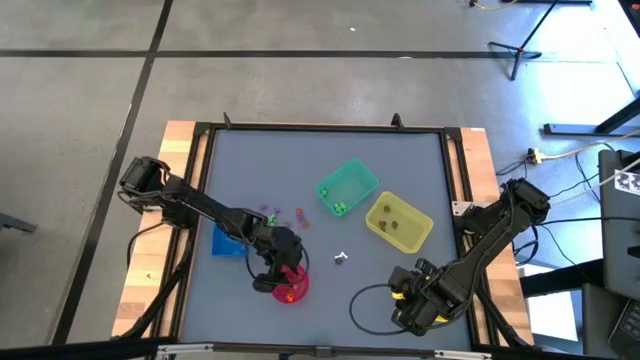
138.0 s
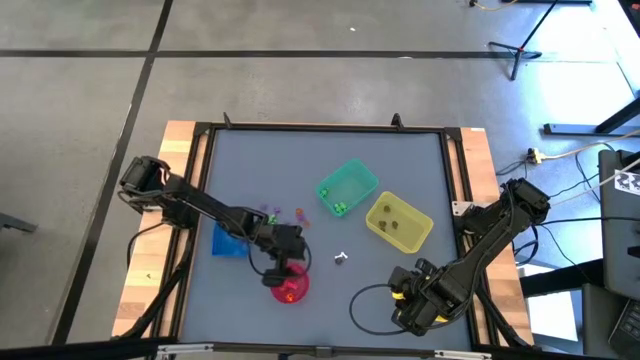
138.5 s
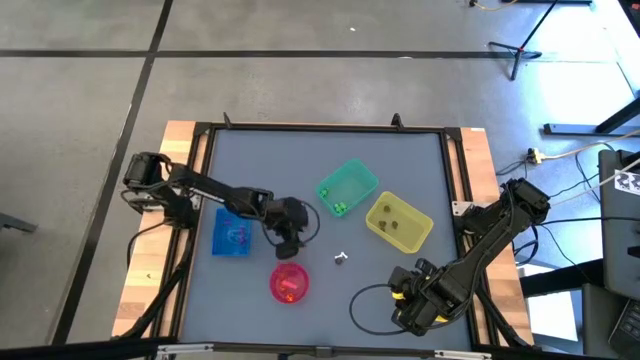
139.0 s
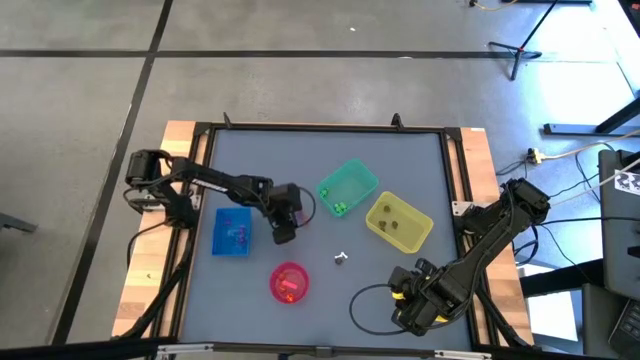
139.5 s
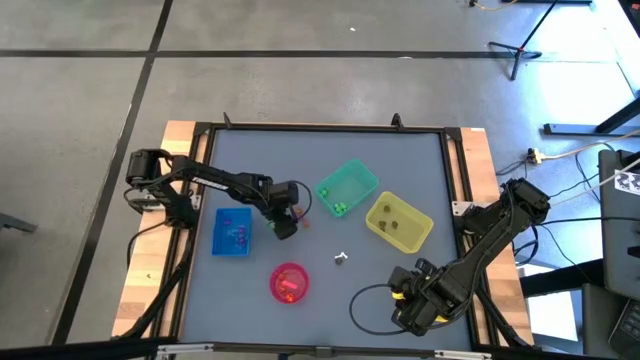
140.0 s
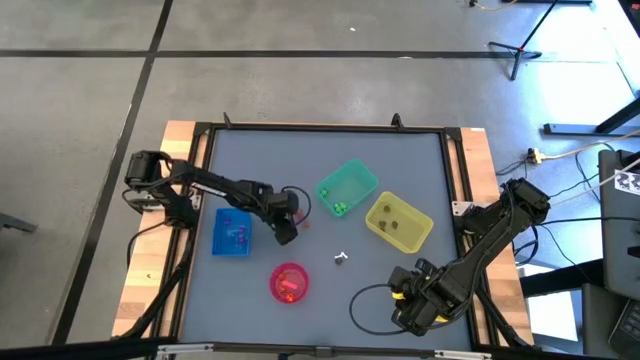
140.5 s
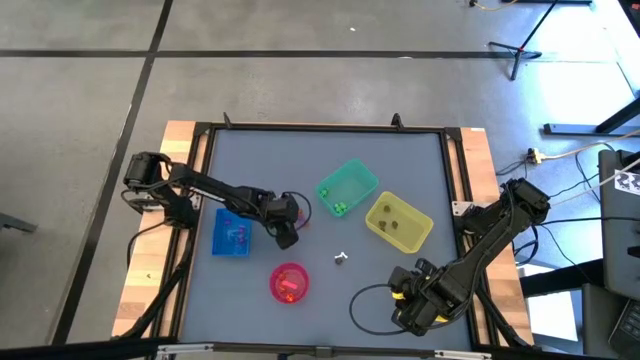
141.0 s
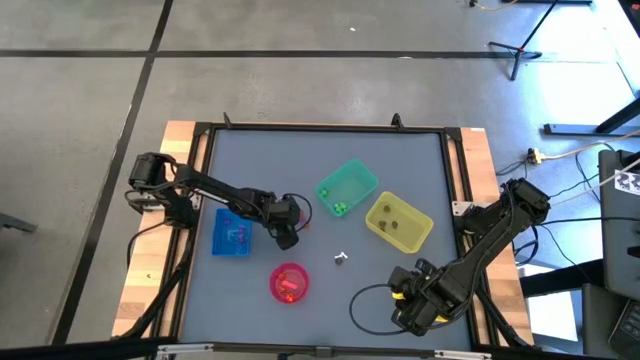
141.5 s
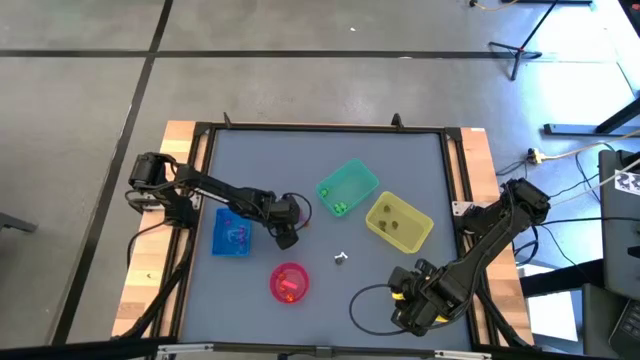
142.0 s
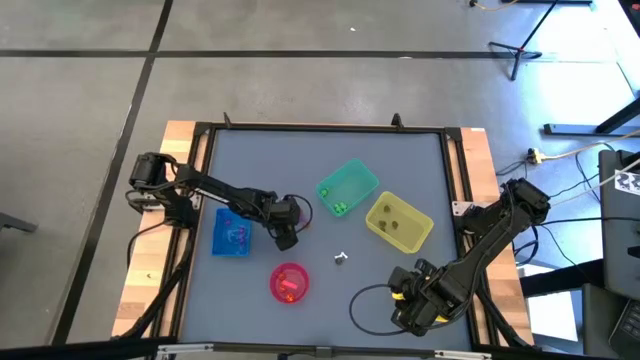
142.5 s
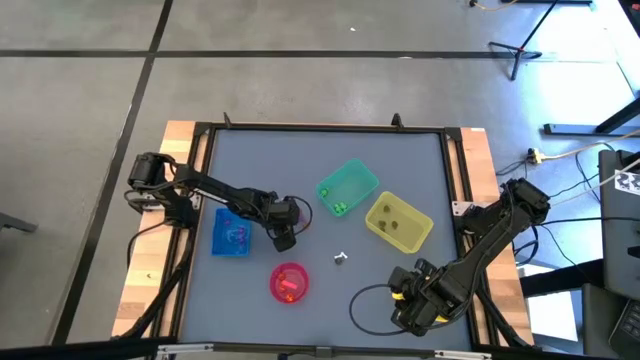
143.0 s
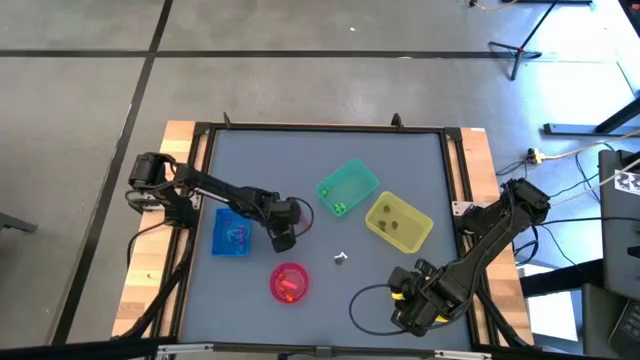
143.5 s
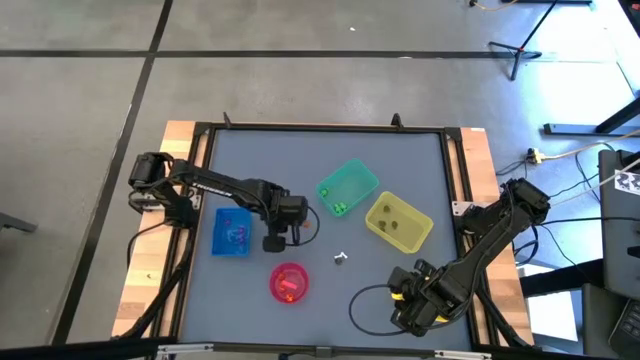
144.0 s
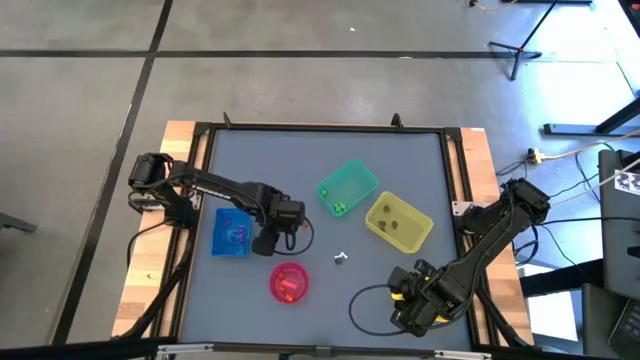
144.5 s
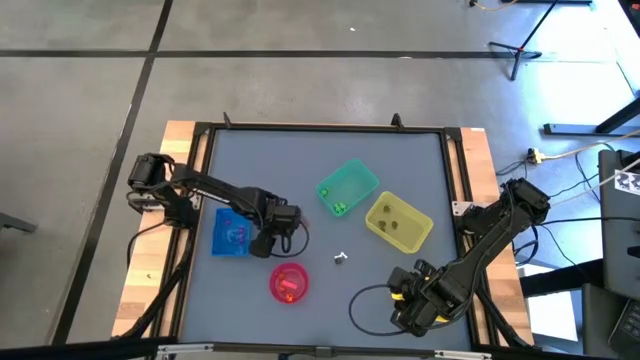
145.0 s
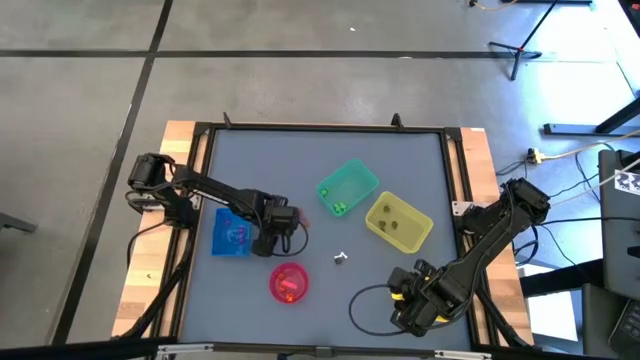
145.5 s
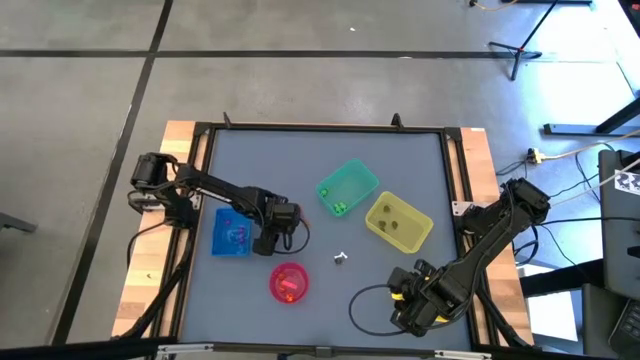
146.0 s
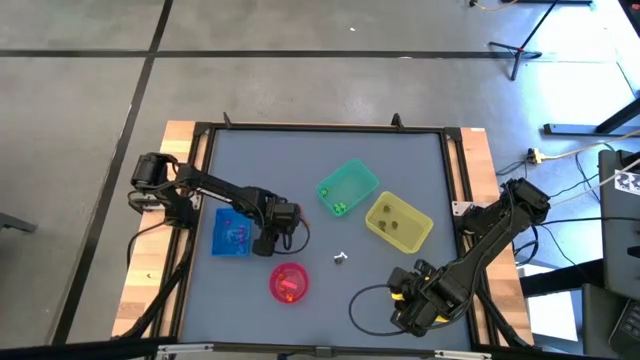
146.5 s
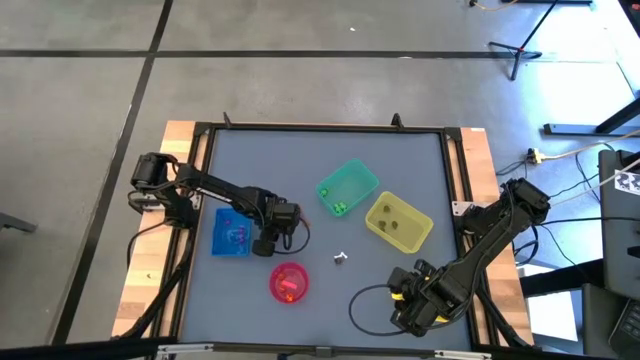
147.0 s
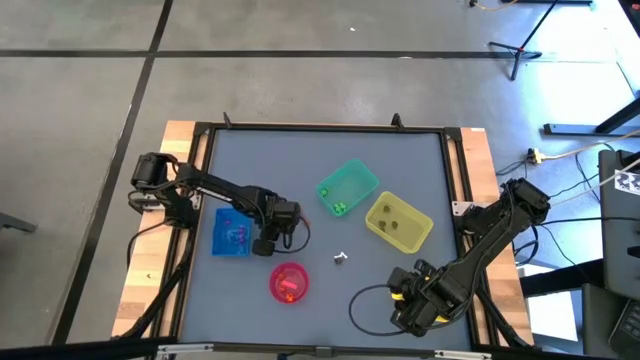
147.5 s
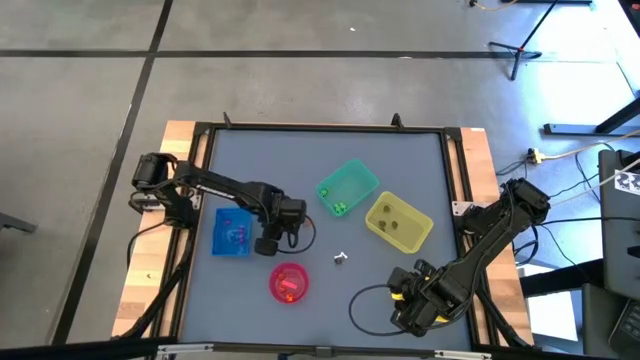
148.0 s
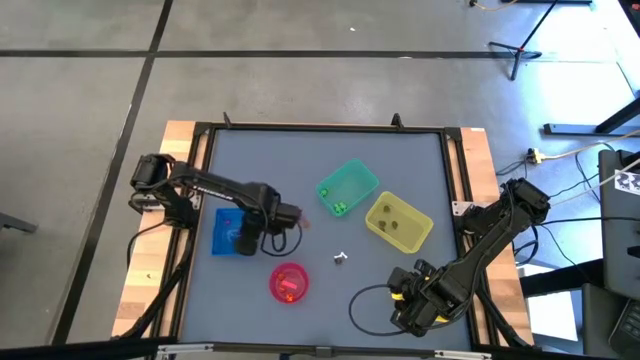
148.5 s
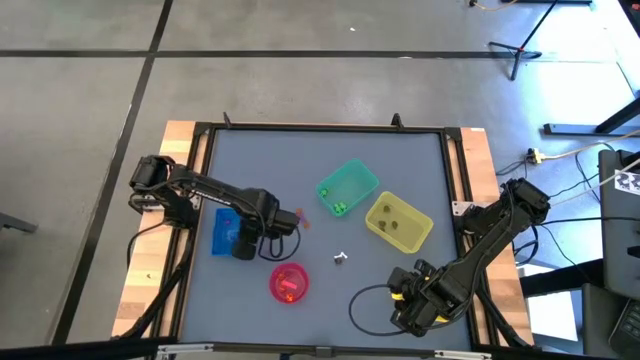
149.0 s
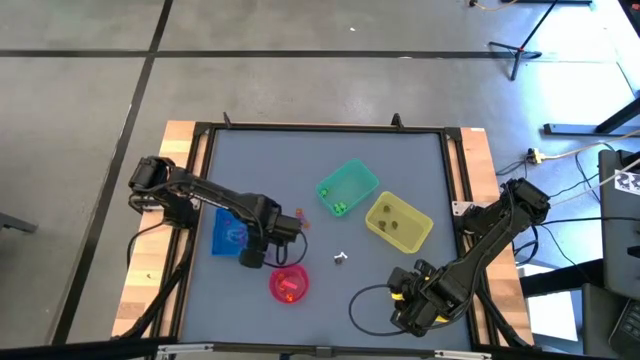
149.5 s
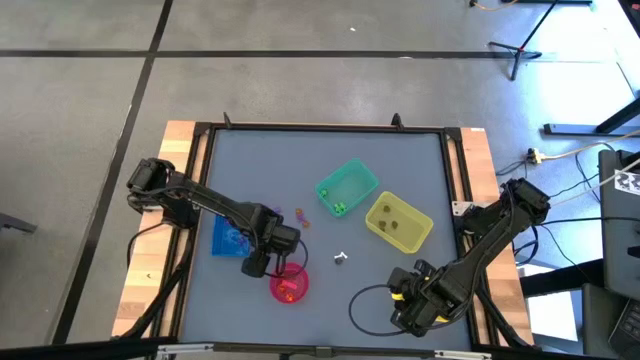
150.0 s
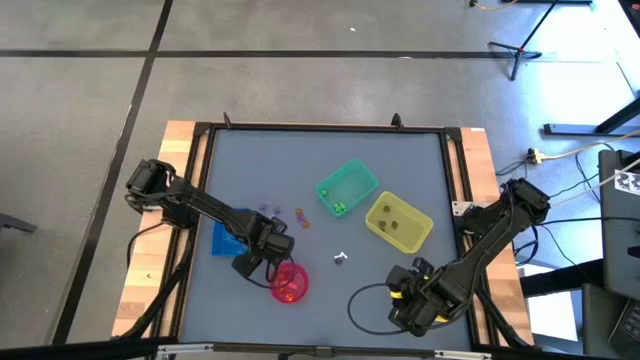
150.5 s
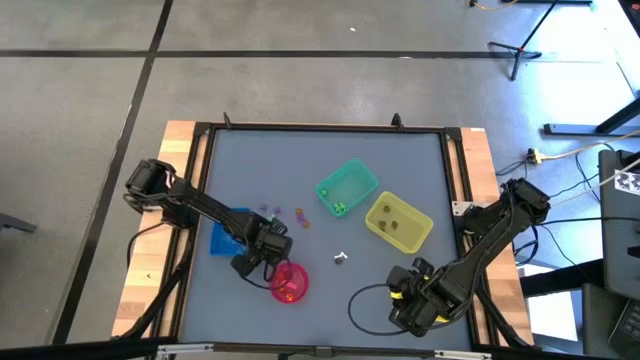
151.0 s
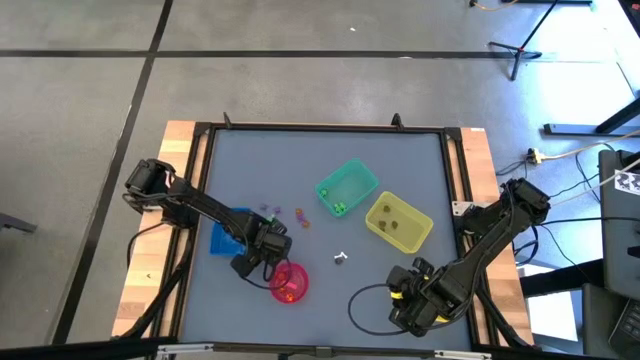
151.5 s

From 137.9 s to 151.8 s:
Task: Sort Halloween decoration
Put the violet spider toy into the blue bin

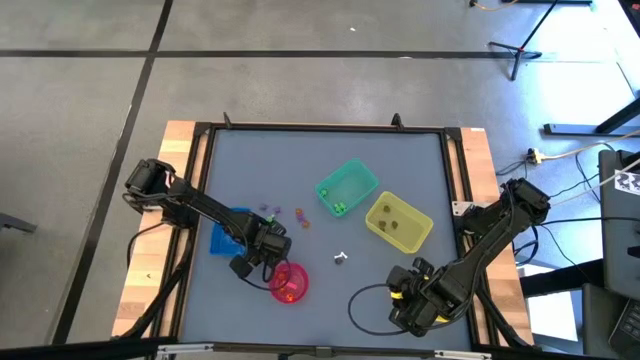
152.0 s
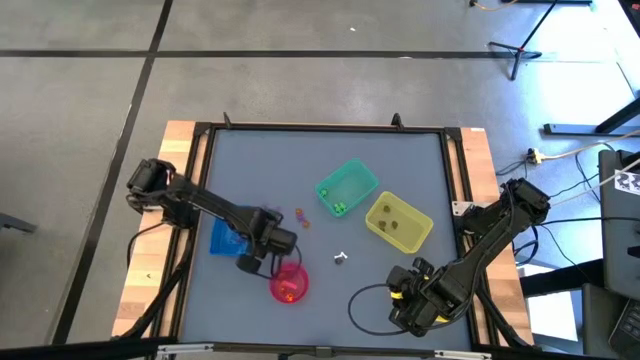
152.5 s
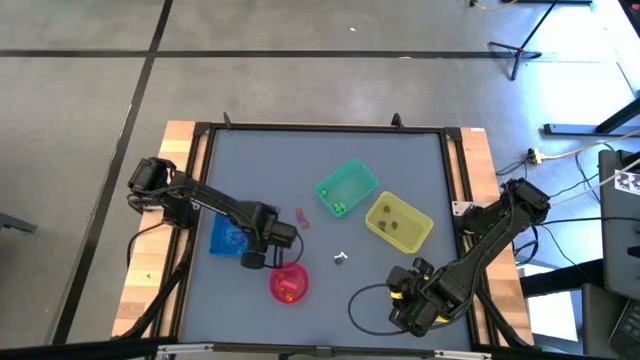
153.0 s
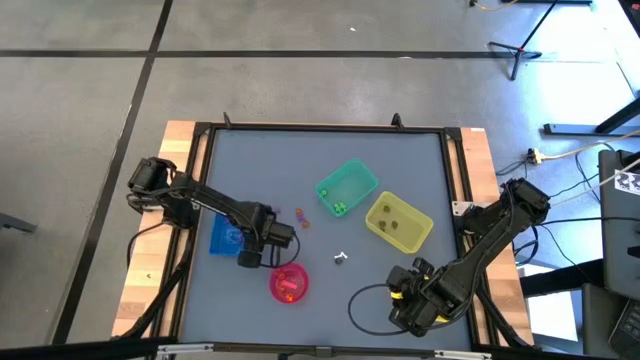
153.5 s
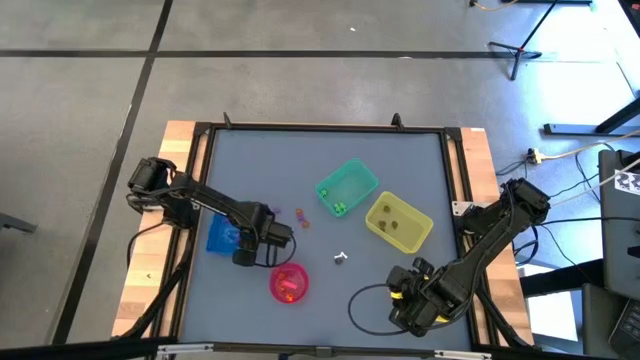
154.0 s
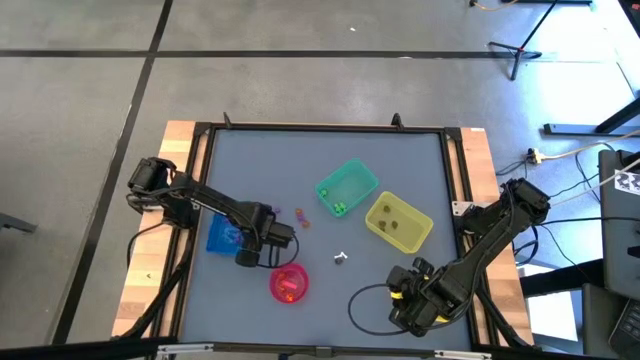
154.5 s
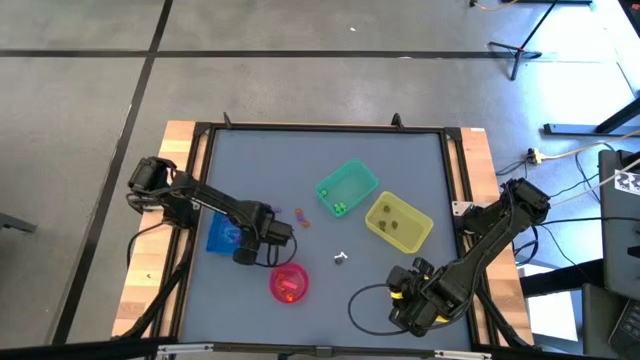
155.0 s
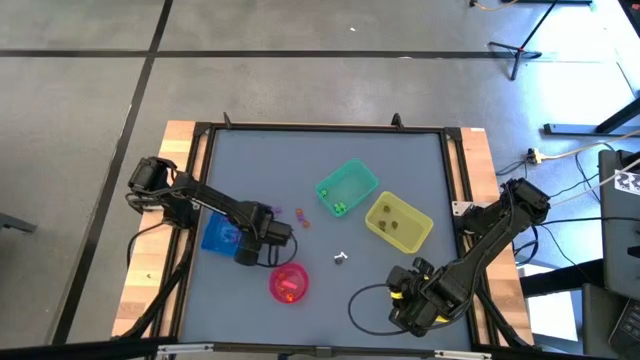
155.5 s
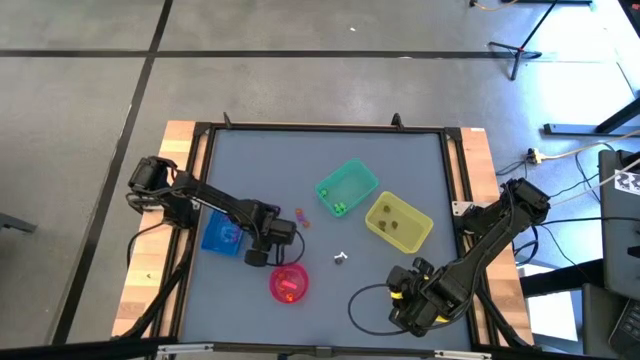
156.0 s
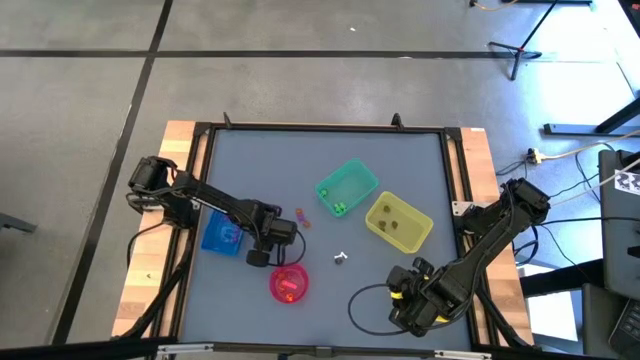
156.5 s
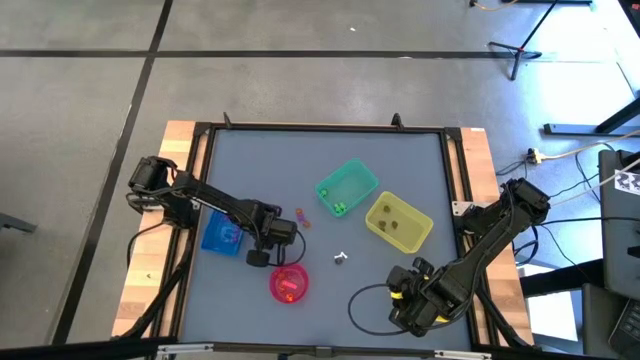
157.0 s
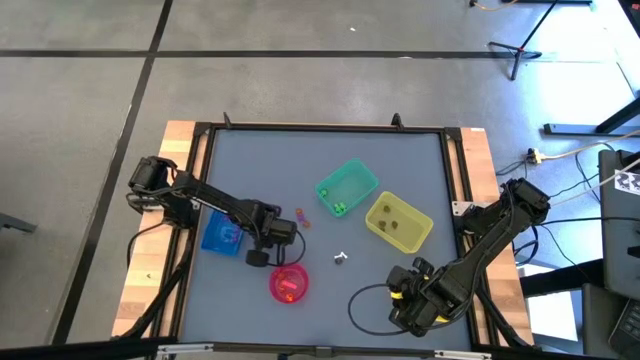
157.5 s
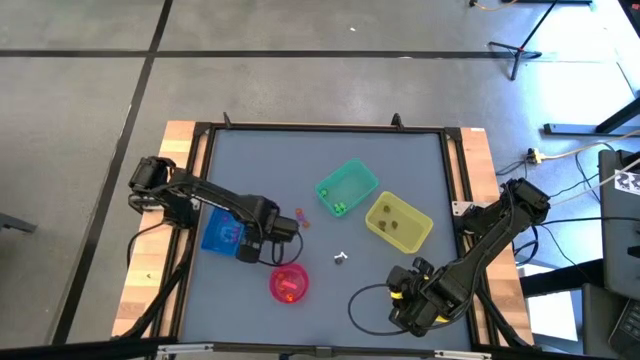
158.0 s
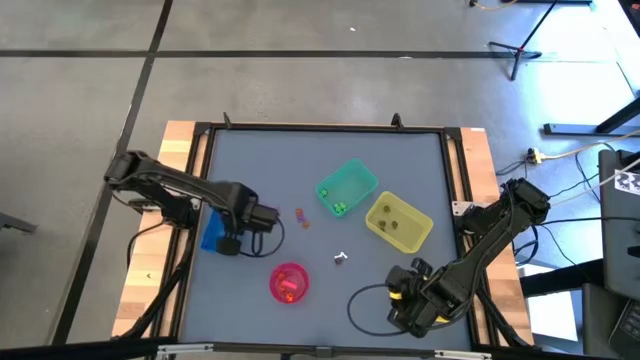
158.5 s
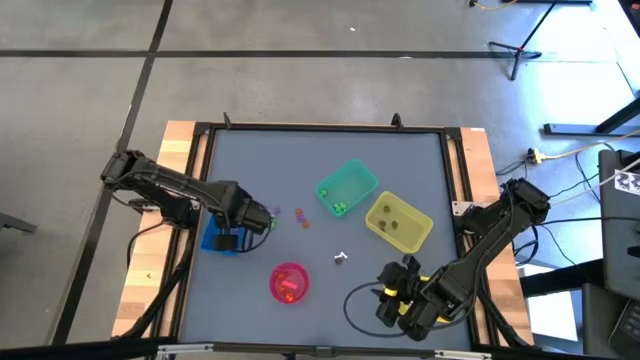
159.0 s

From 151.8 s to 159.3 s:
Put the violet spider toy into the blue bin
